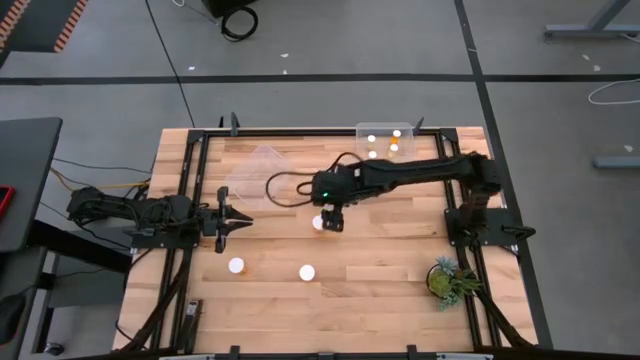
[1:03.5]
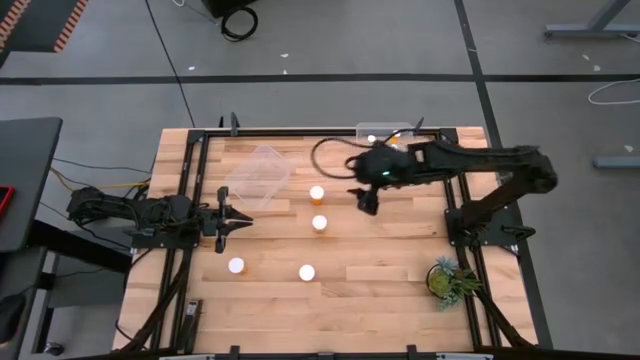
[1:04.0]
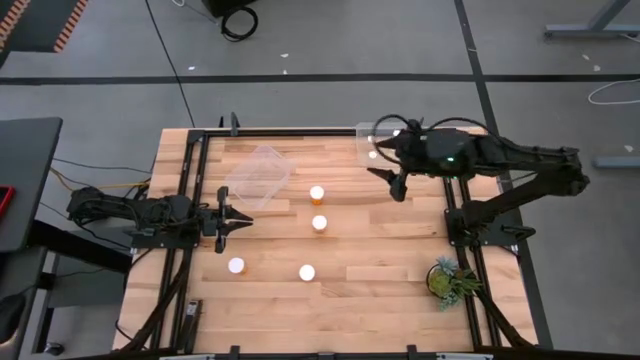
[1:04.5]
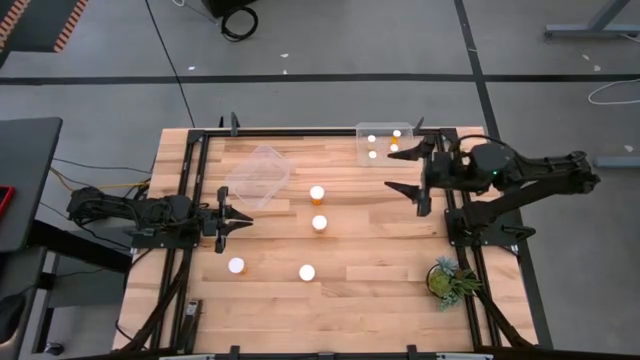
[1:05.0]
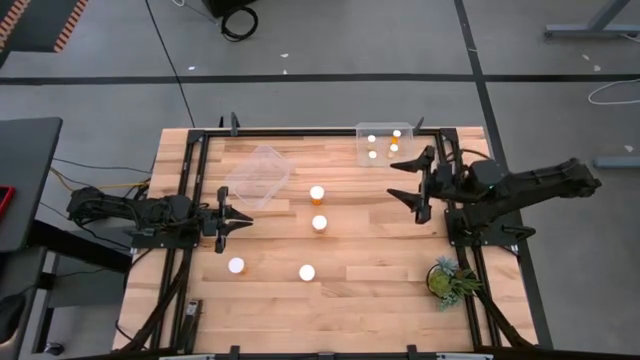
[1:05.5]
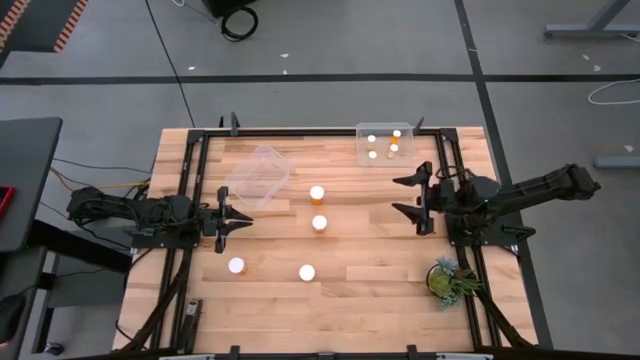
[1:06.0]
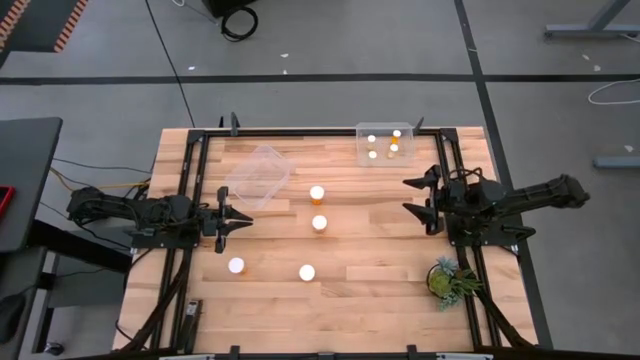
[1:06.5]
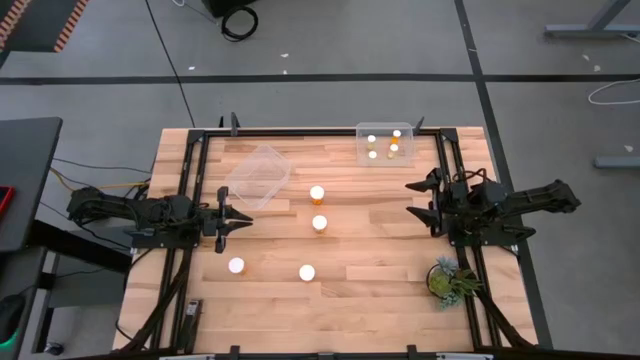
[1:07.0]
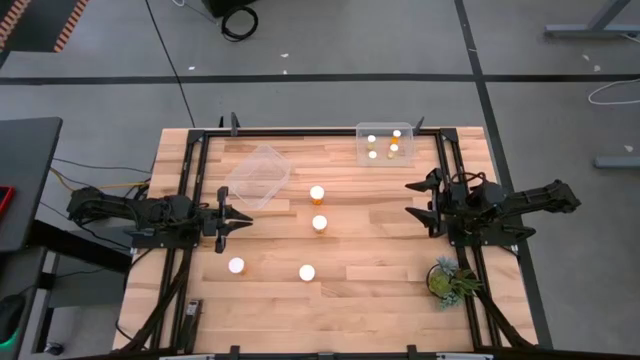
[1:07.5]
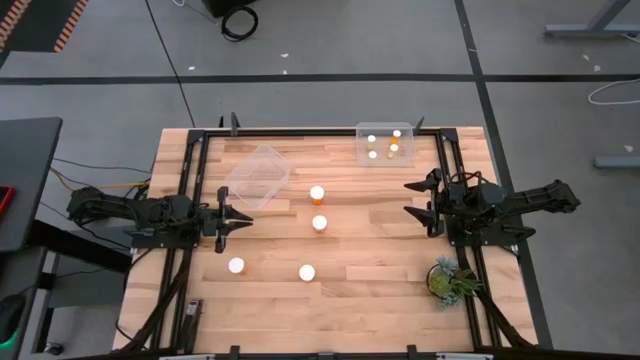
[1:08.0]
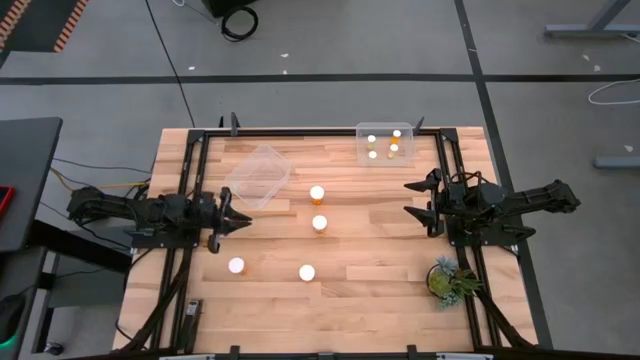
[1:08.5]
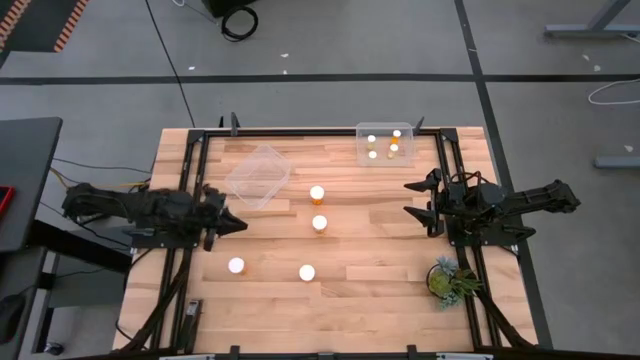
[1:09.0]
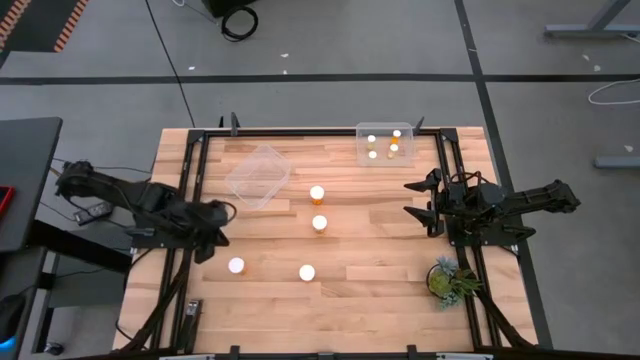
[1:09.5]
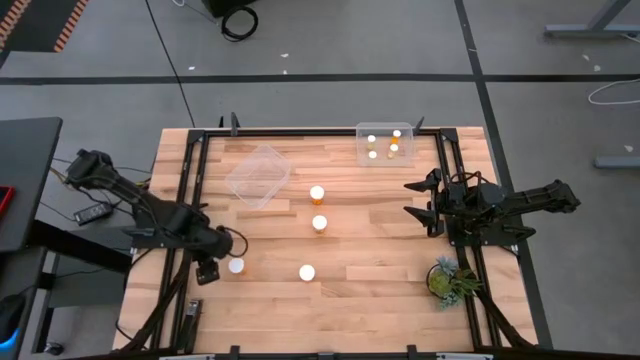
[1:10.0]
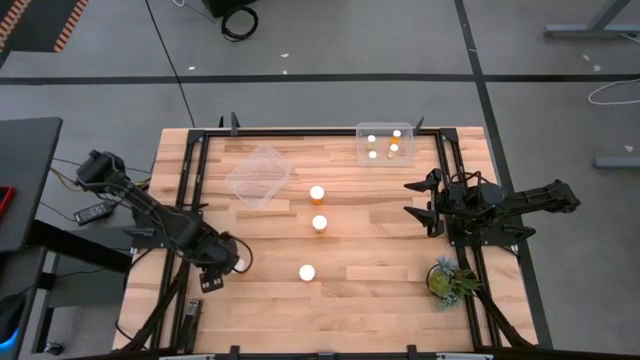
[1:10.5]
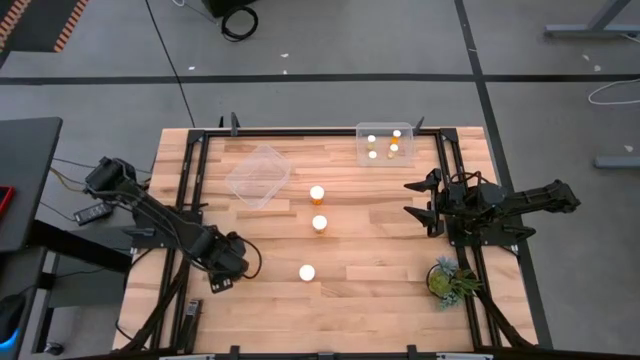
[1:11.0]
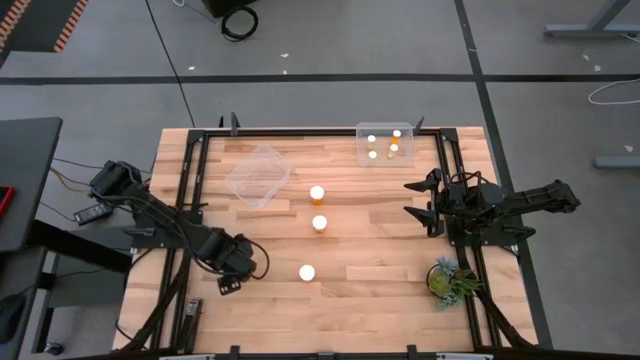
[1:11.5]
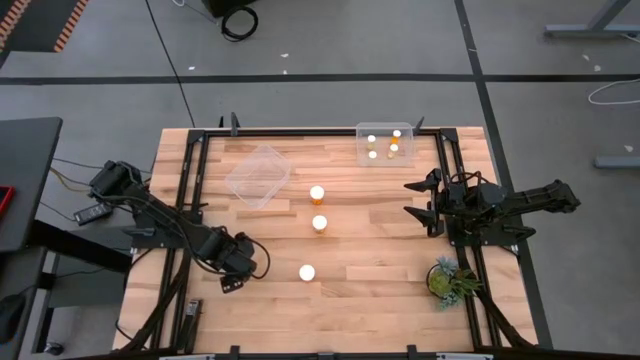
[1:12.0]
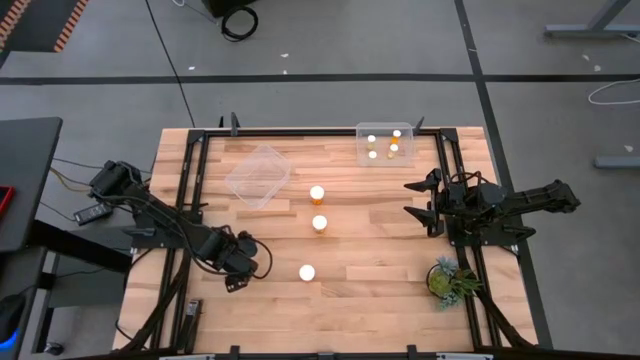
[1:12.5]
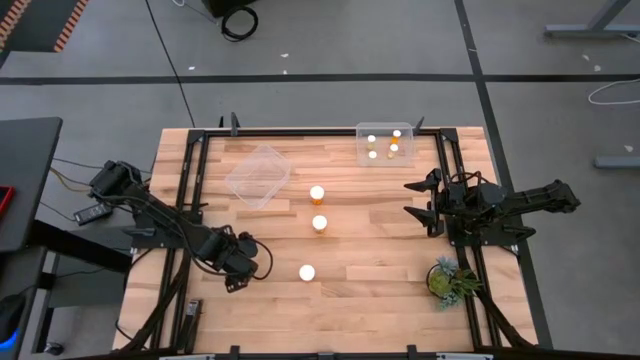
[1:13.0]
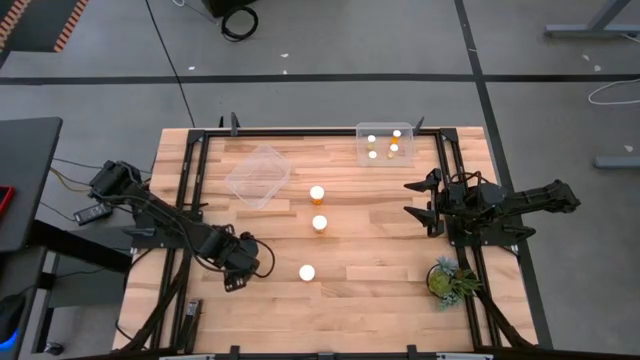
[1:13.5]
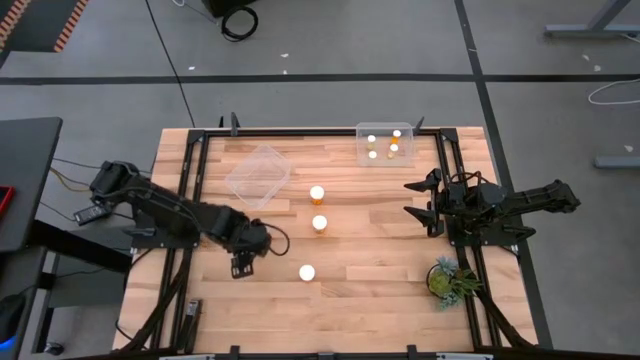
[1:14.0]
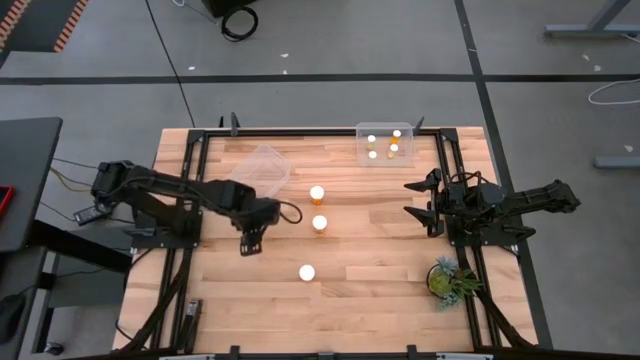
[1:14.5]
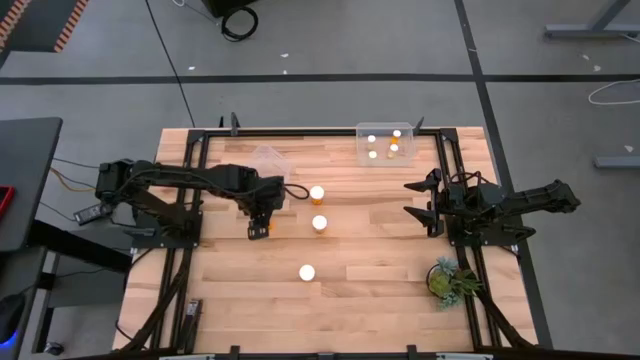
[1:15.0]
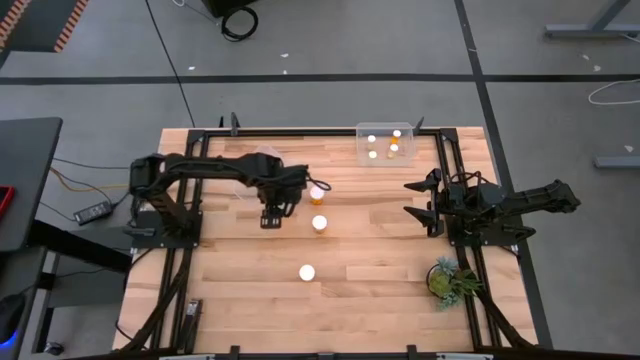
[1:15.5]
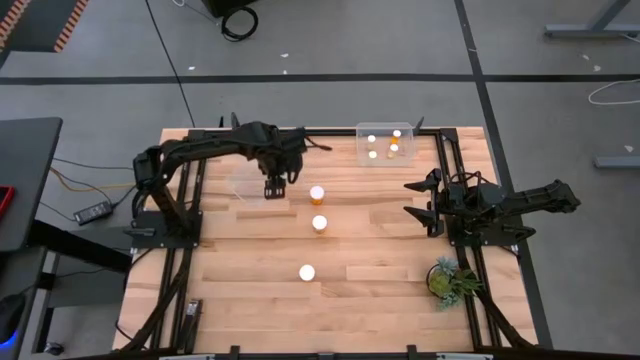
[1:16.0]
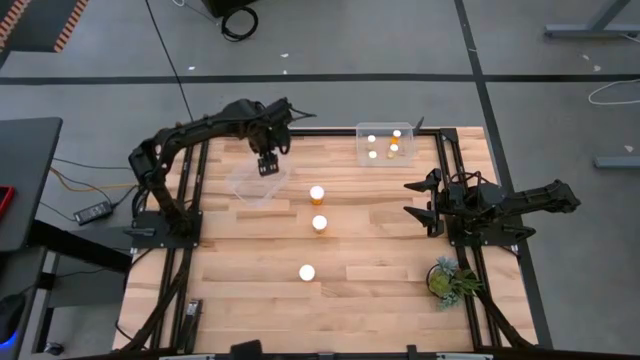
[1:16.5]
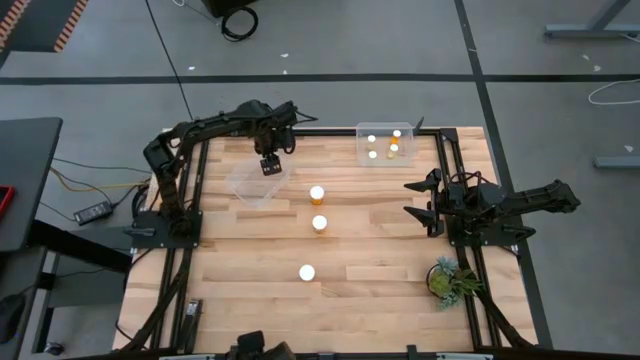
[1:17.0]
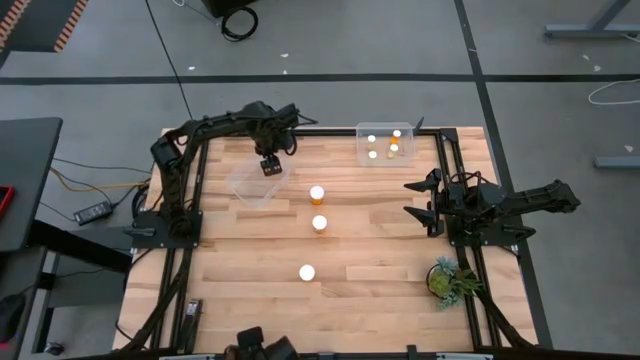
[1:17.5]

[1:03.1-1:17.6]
Task: Pick and place medicine bottles into bin by pill shape (circle, oval)
Put the orange pill bottle into the left transparent bin

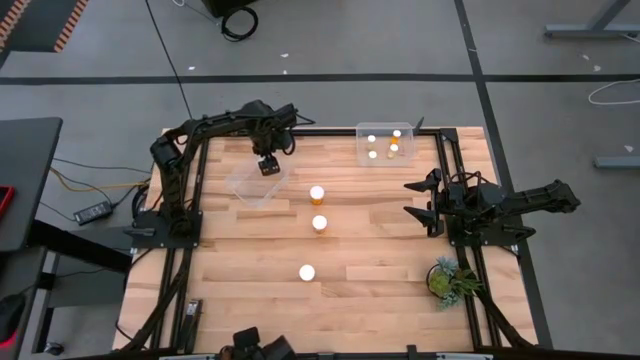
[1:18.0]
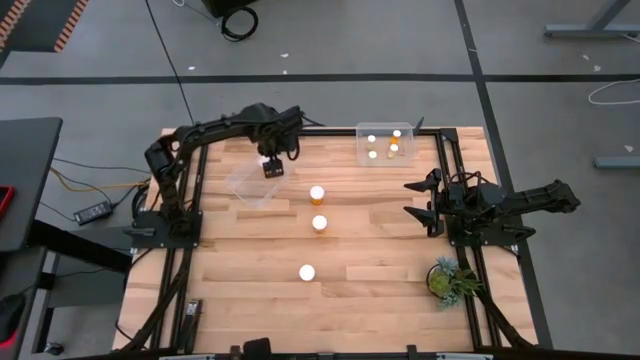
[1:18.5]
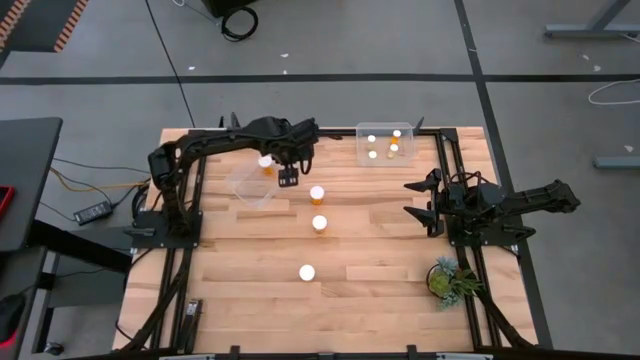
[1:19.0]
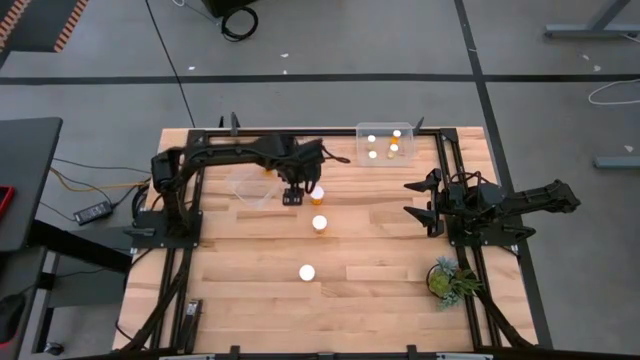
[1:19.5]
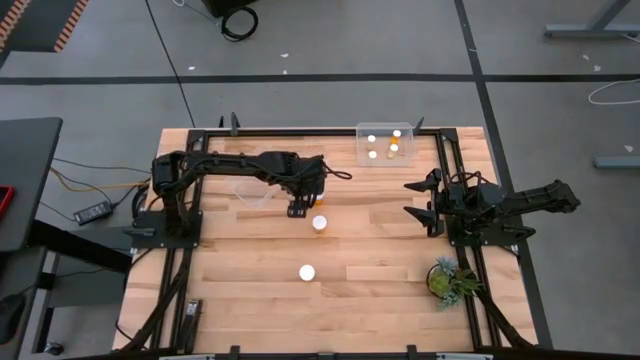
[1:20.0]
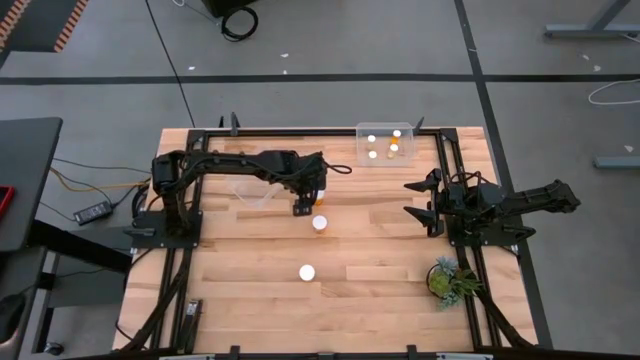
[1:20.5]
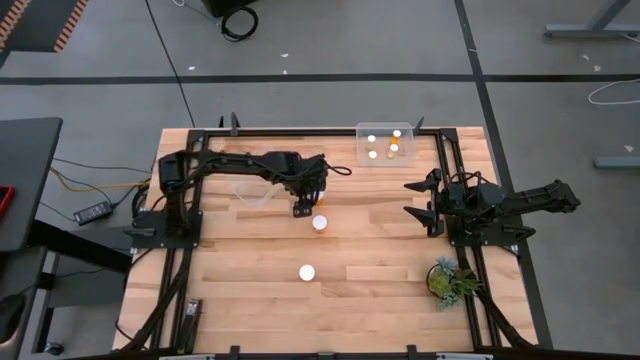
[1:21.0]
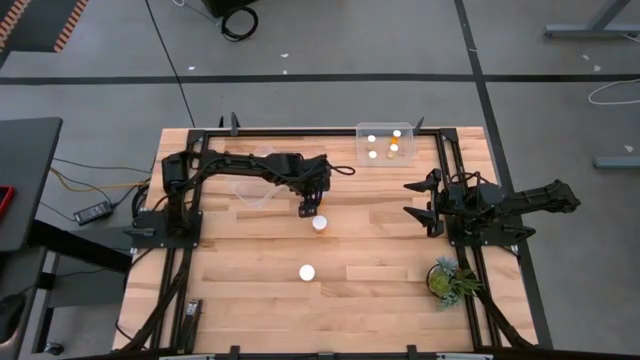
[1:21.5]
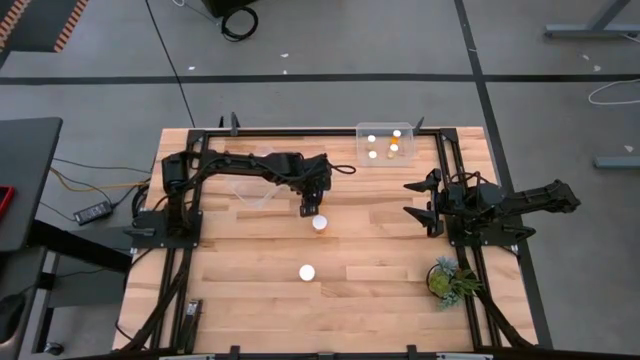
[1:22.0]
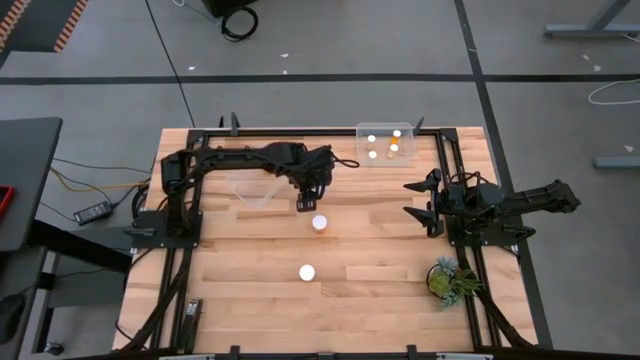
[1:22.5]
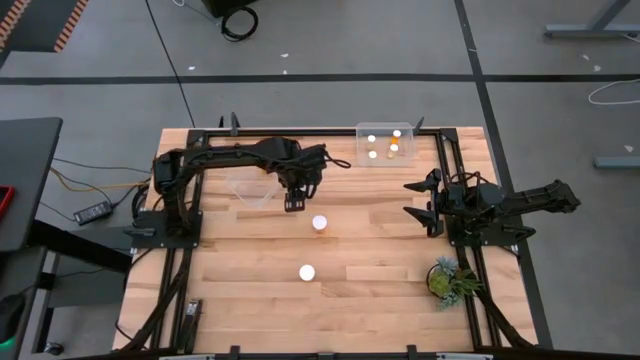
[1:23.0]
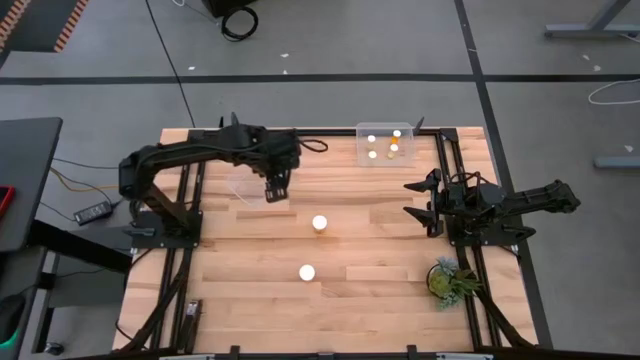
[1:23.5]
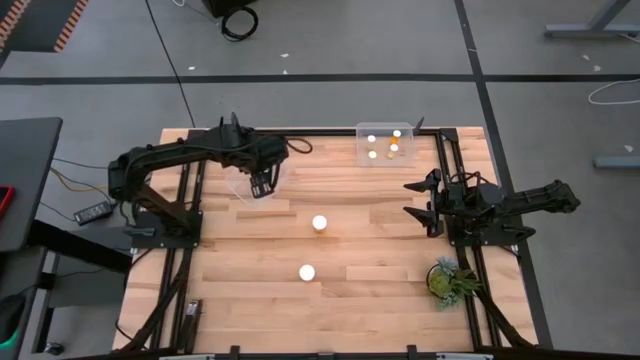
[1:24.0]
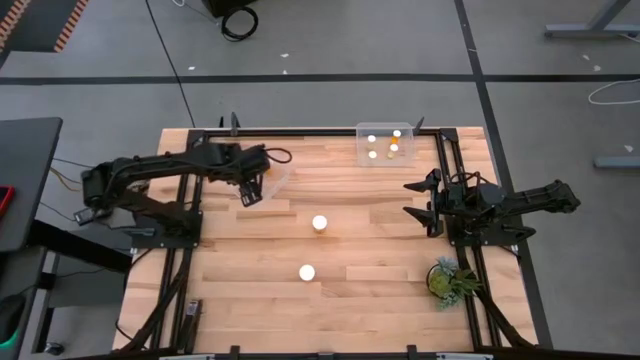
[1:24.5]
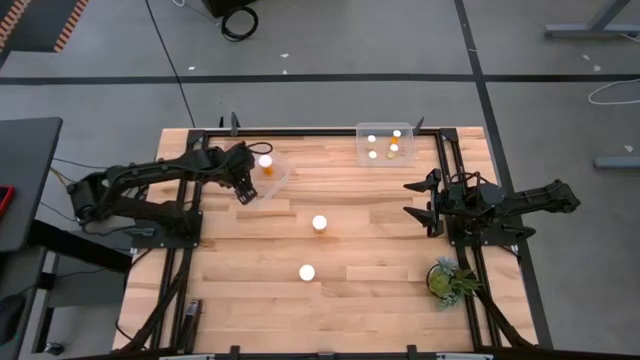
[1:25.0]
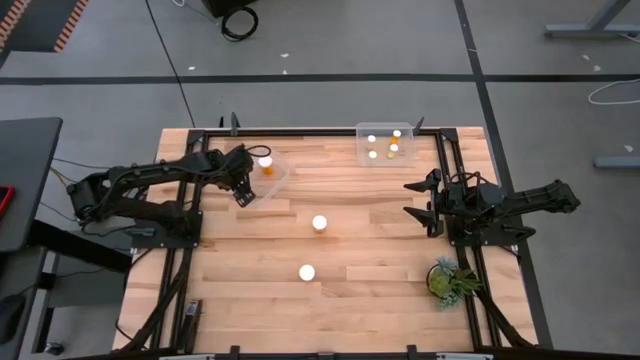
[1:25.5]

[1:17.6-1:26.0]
Put the top orange pill bottle into the left transparent bin
